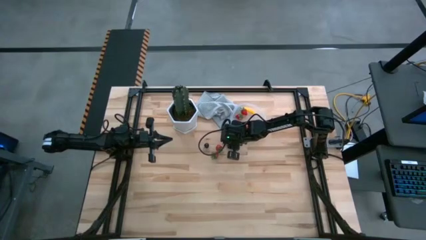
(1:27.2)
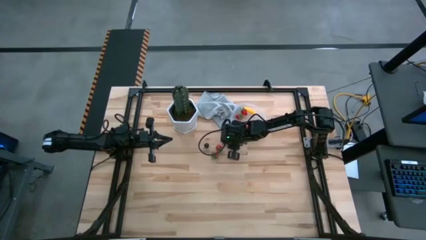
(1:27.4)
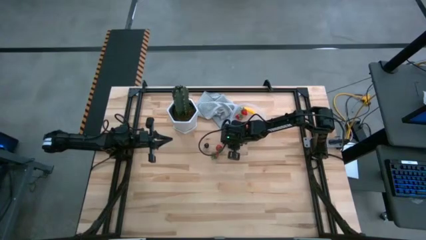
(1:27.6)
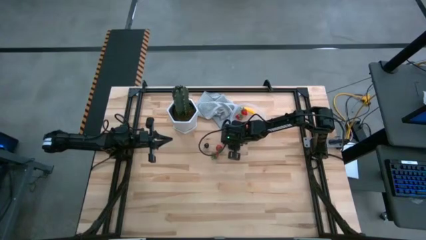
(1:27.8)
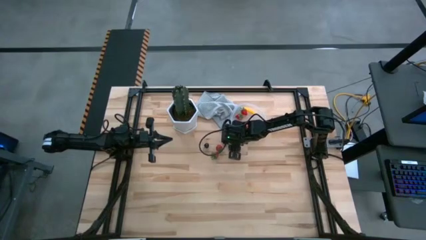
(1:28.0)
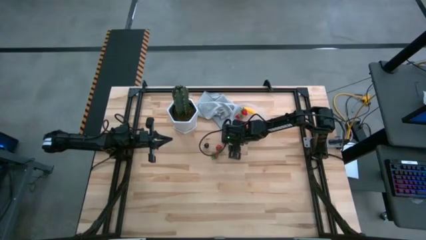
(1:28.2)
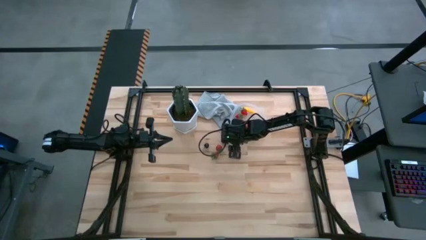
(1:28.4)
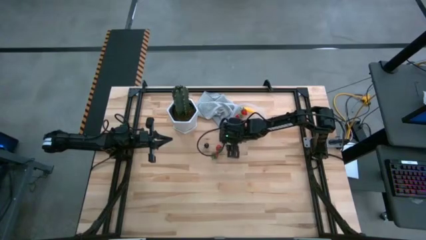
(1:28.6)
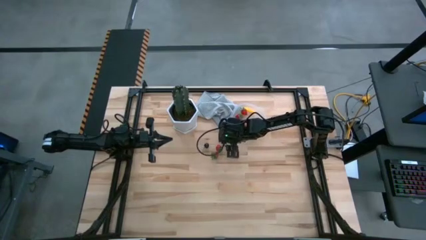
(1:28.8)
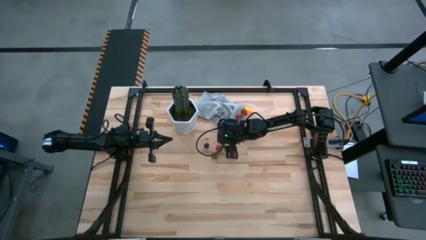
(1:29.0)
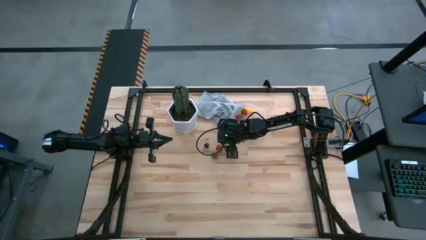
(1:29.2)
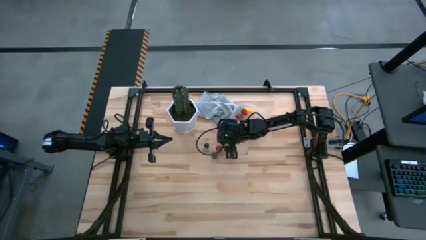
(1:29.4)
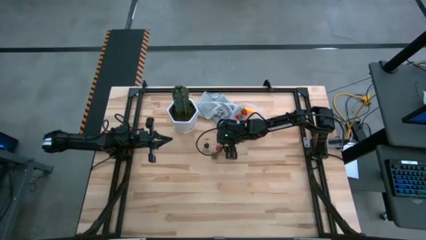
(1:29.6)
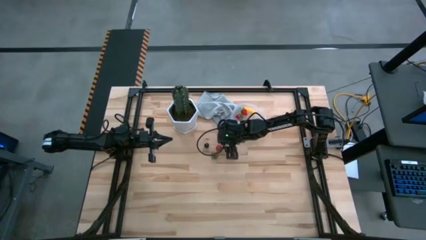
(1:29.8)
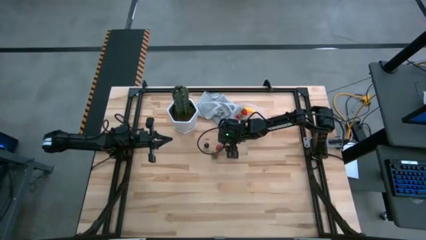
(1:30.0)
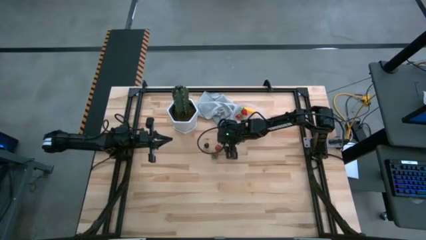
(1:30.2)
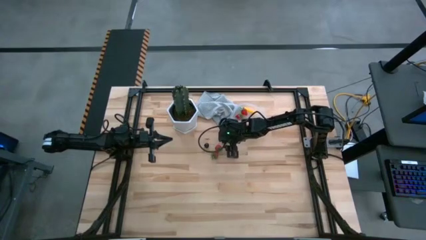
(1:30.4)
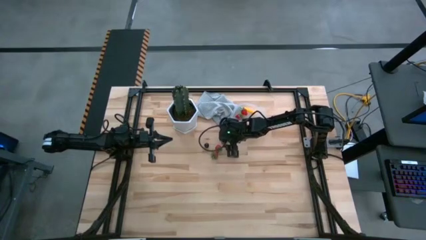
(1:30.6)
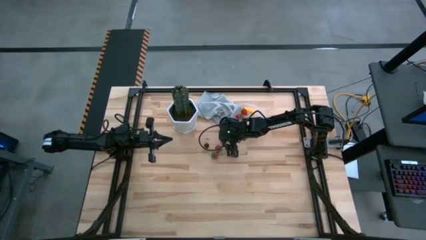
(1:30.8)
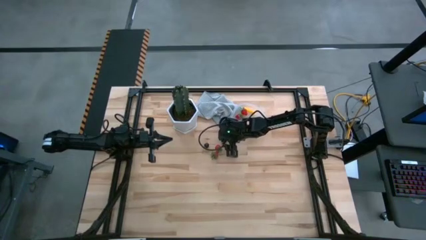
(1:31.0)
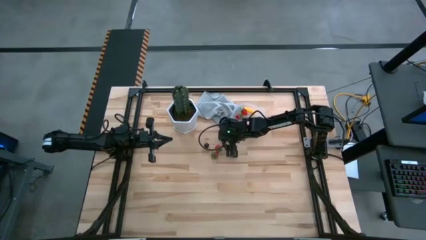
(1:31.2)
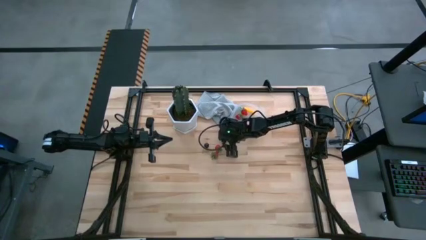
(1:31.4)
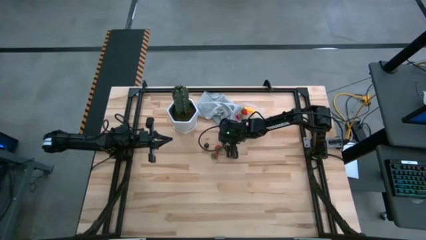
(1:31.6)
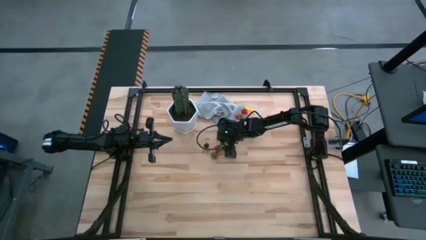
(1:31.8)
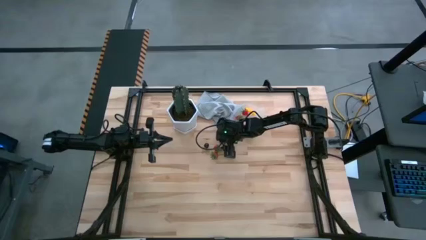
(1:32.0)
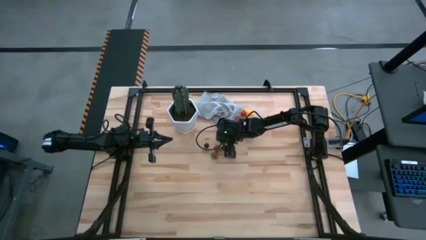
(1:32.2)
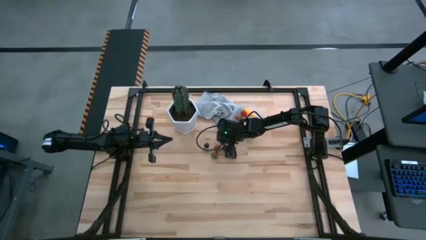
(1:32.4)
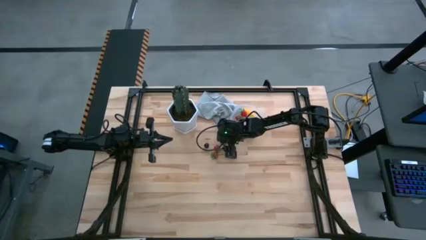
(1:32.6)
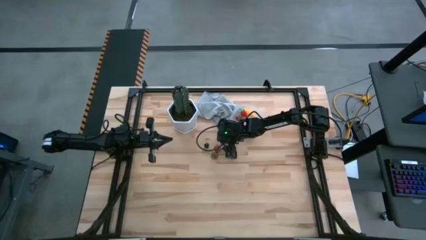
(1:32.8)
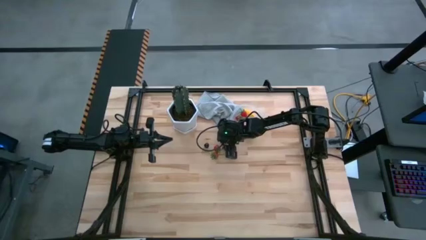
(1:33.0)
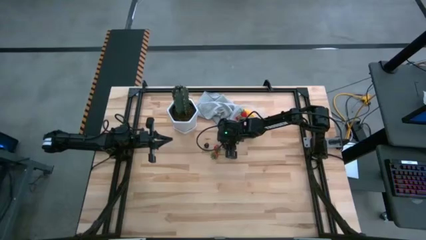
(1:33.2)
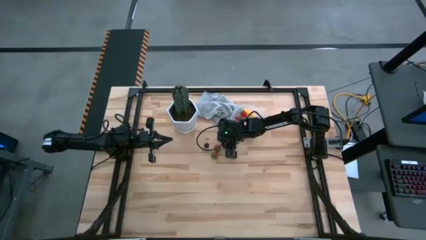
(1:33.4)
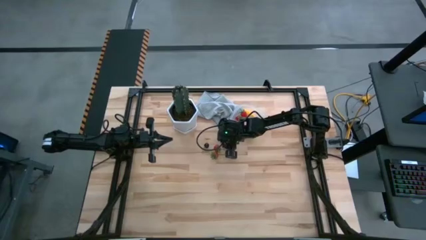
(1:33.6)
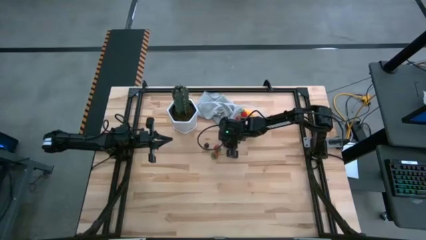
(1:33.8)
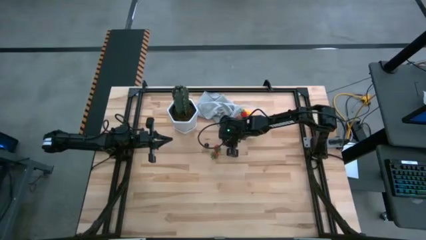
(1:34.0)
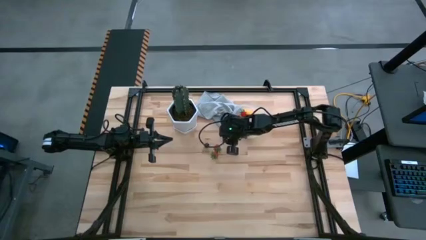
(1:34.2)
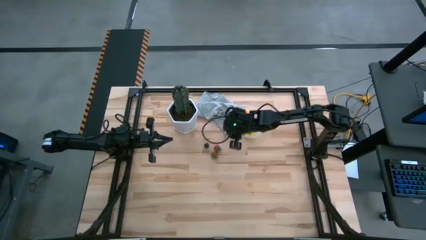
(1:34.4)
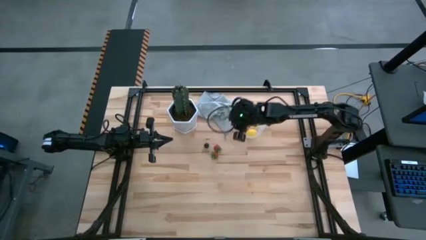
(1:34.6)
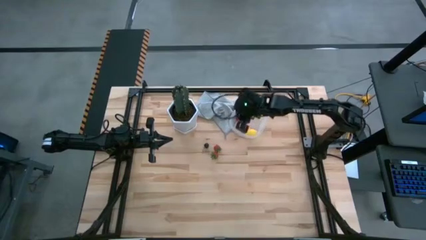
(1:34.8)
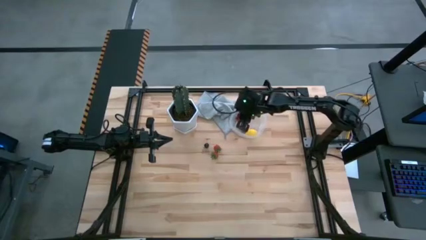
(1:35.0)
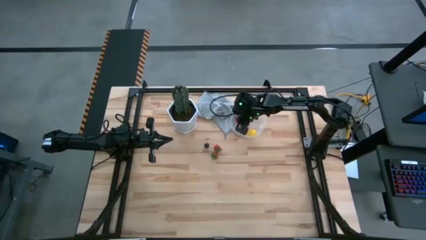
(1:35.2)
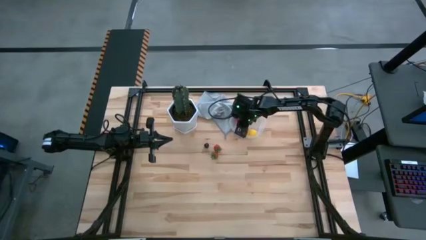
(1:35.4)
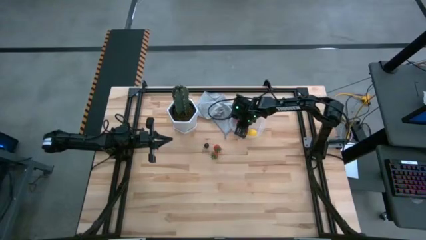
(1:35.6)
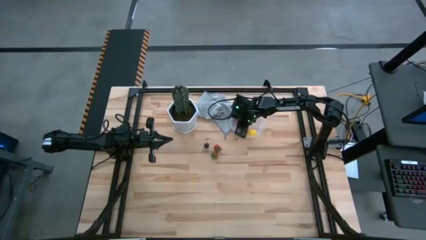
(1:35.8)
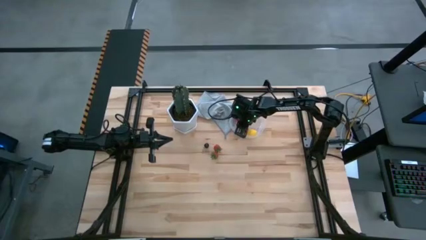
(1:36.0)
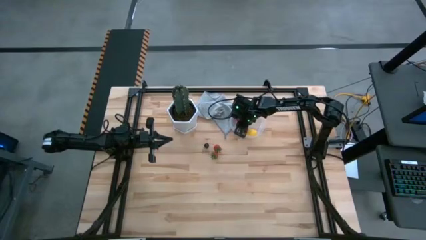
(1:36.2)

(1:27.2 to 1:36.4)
Task: Pick and placing Produce into tupperware
Put the blackberry into the transparent bin

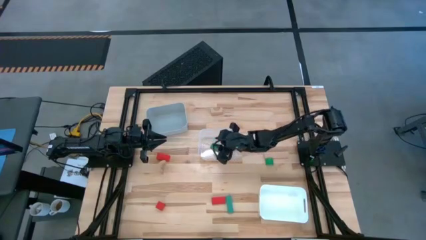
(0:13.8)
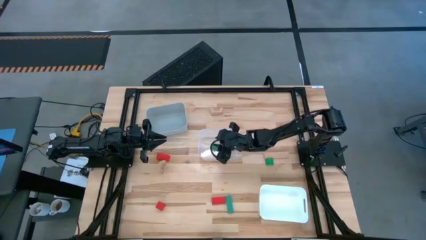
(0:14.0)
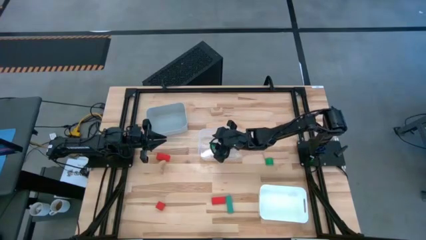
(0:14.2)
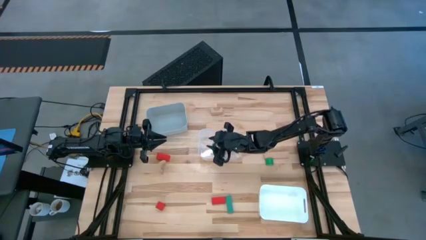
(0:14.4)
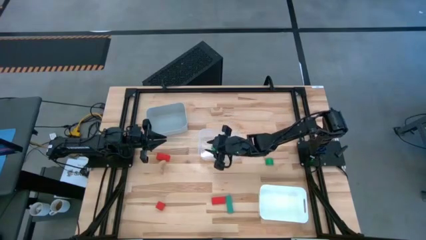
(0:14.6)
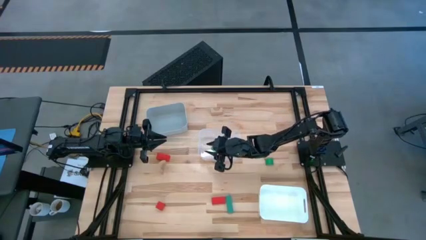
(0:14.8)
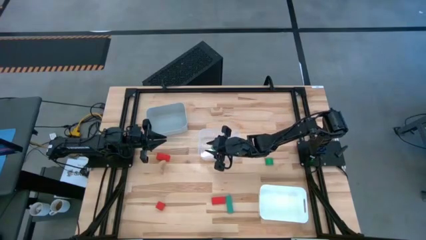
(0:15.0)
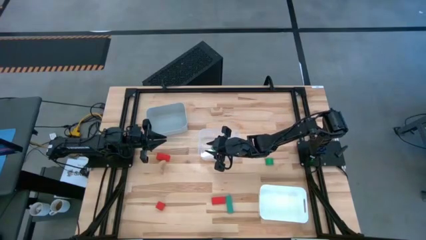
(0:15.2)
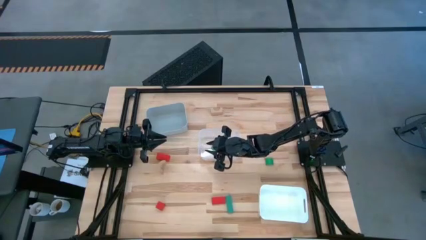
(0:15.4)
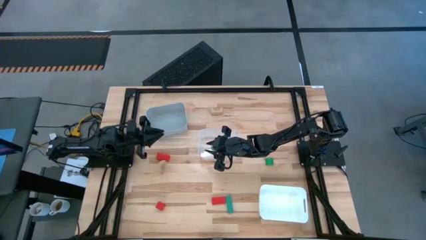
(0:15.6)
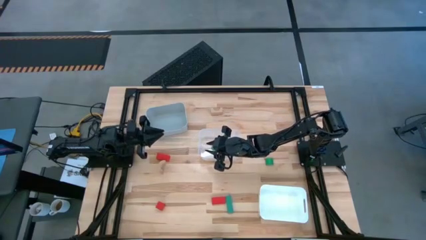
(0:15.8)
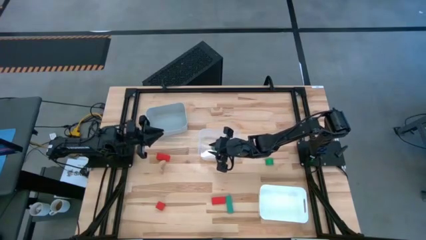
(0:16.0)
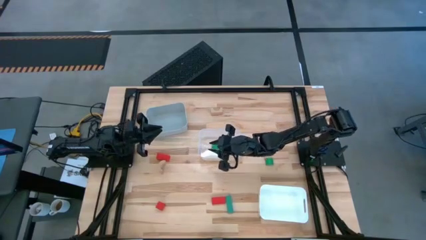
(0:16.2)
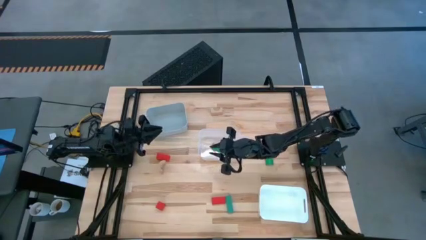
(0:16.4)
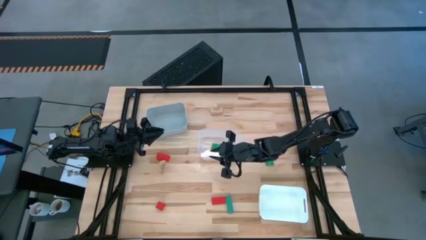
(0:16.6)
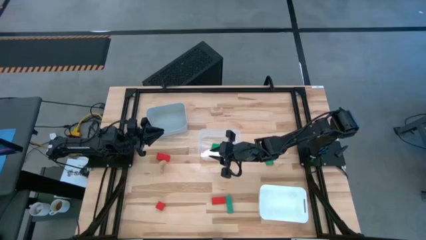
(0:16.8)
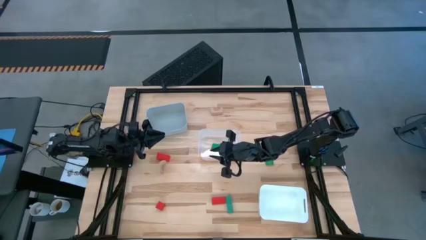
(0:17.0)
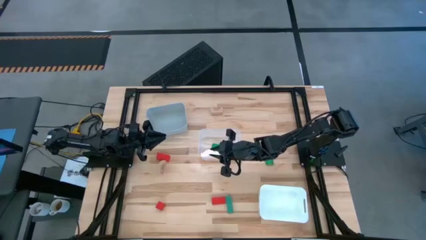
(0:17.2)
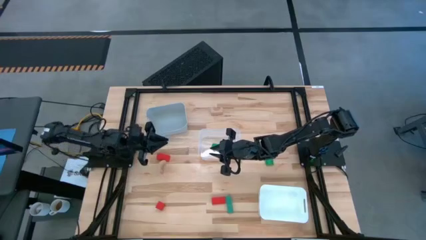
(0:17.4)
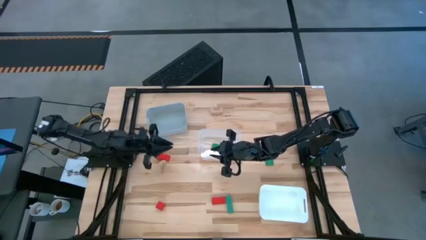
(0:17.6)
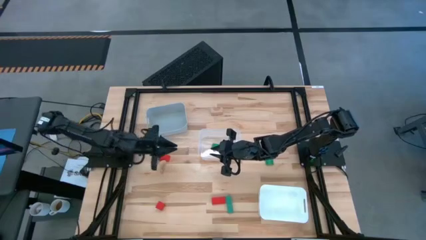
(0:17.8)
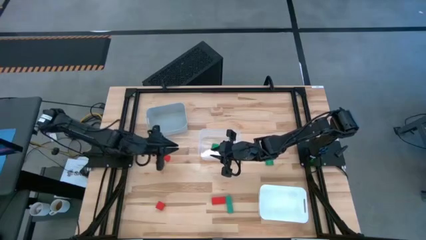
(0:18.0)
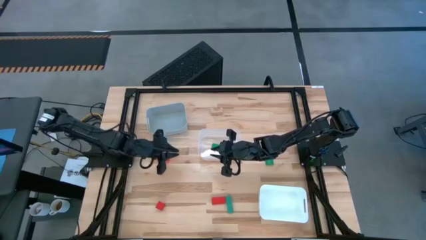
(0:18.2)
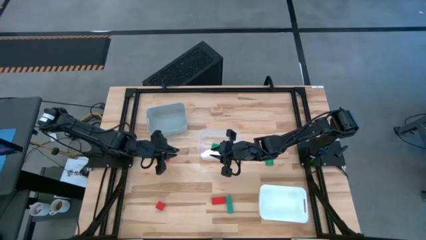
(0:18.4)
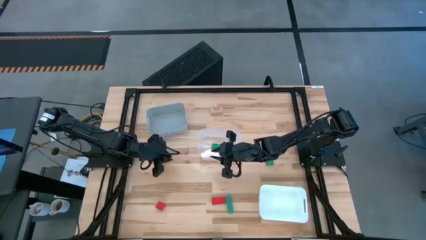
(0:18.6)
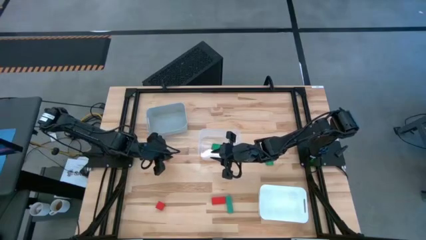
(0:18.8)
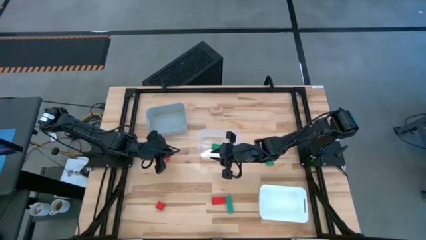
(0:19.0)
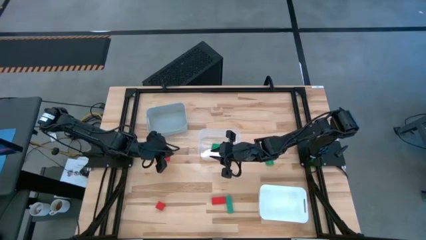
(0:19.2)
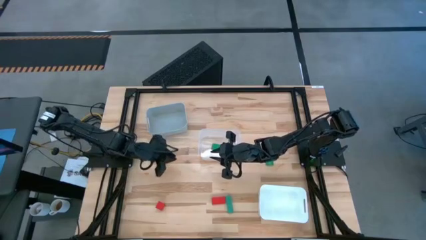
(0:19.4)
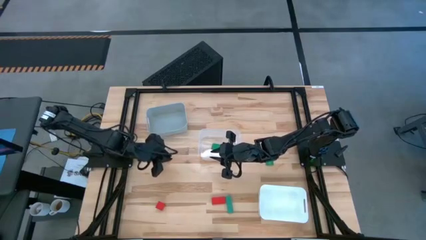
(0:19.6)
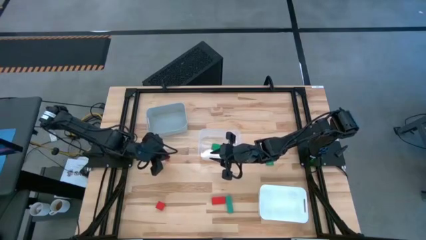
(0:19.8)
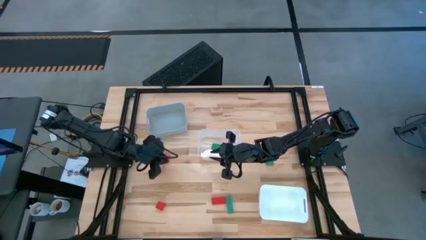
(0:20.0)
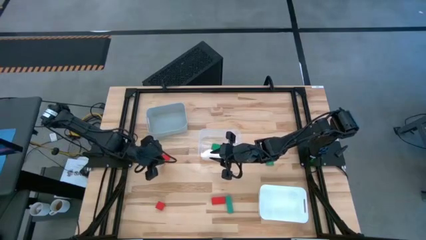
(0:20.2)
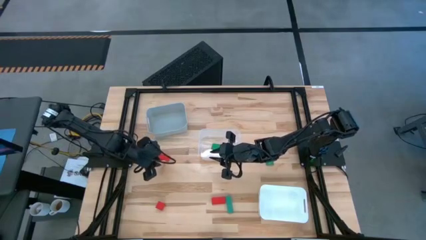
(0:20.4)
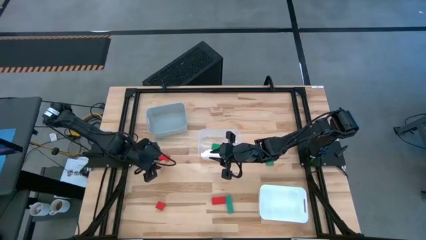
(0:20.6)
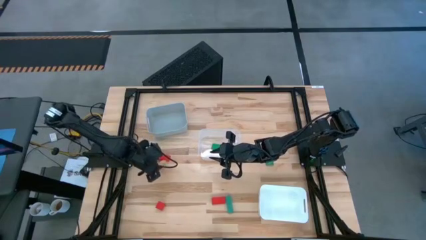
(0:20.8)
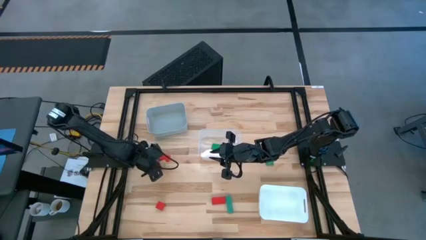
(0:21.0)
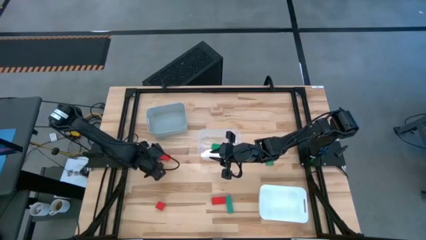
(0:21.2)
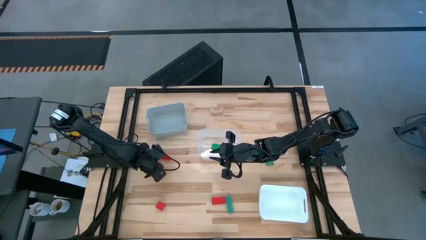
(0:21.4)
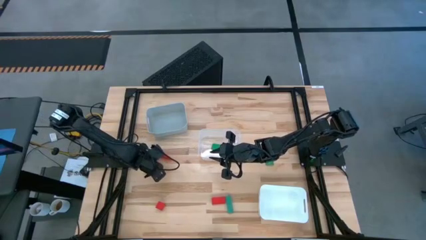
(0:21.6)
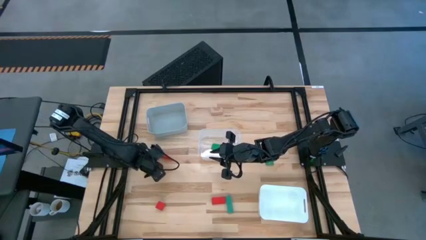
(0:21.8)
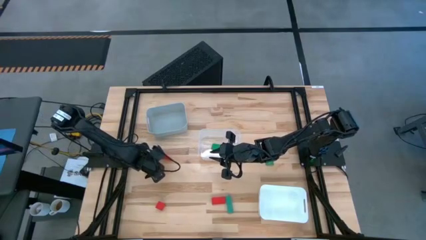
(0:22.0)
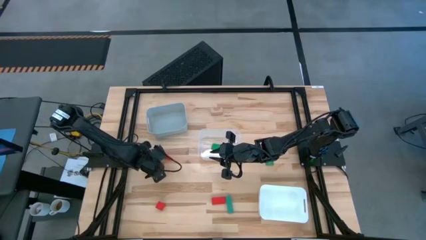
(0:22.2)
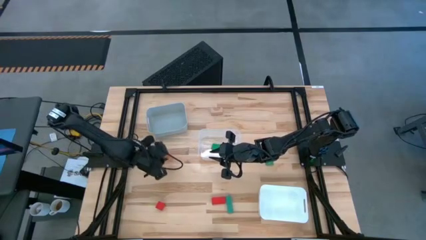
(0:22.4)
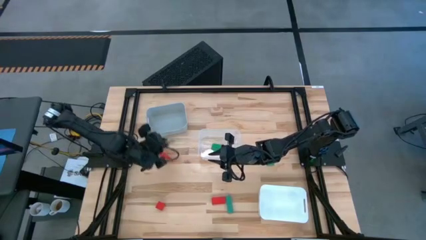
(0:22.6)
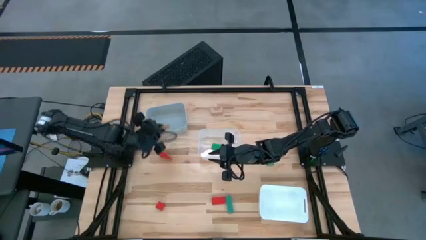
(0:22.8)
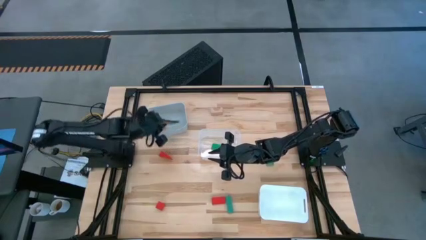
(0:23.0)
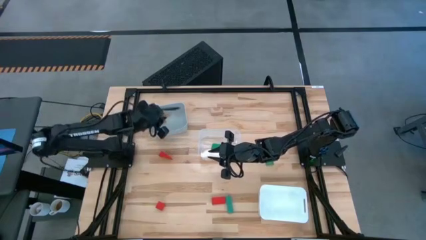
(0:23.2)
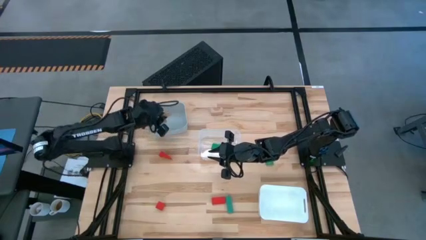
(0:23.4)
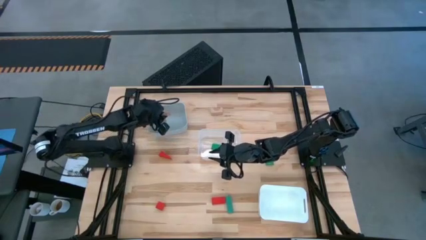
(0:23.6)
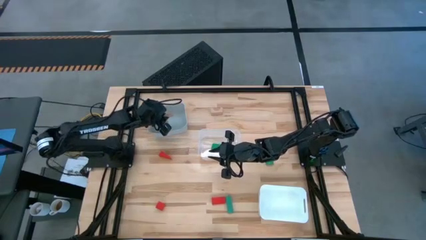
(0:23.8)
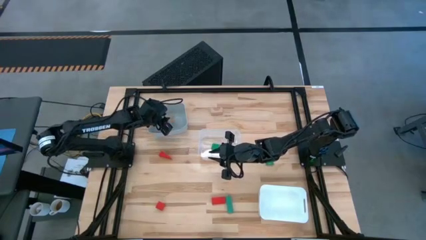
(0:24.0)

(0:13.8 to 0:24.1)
Task: Sort & place blocks by color
Put the left brown block into the gray bin
